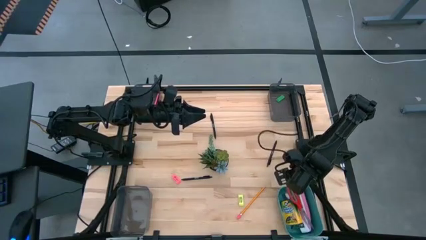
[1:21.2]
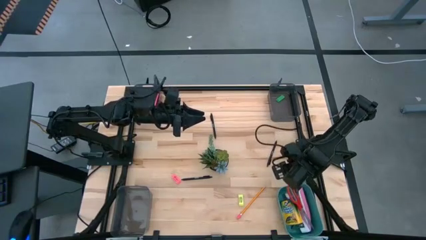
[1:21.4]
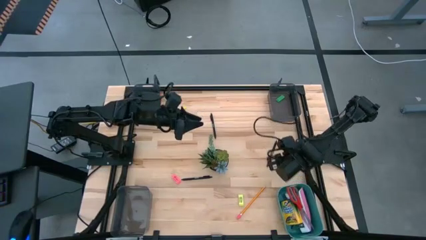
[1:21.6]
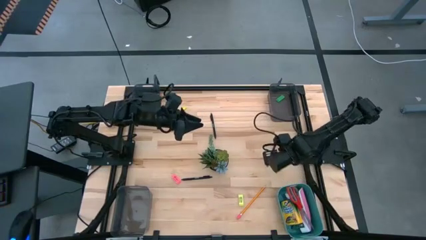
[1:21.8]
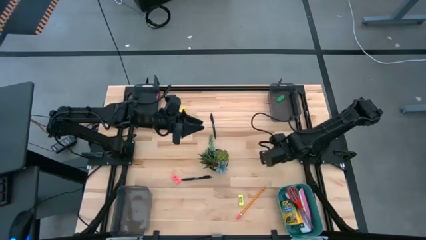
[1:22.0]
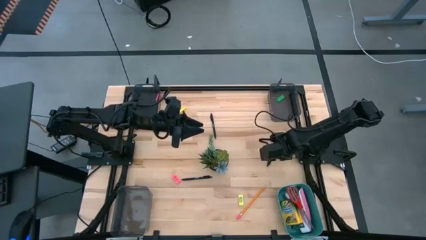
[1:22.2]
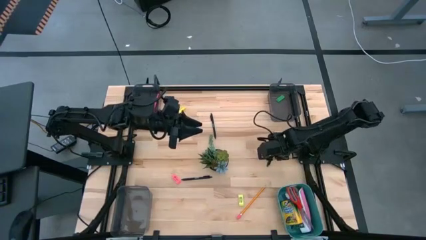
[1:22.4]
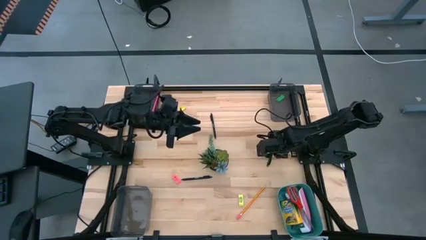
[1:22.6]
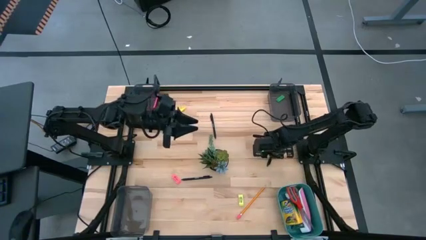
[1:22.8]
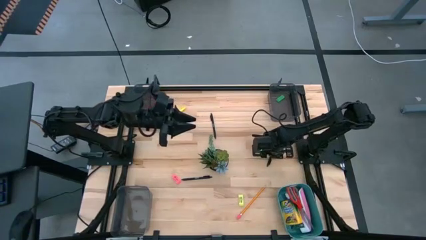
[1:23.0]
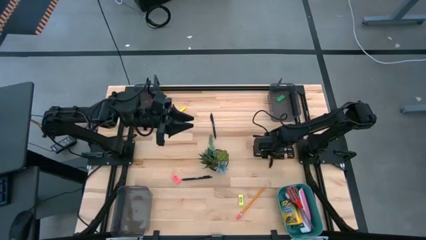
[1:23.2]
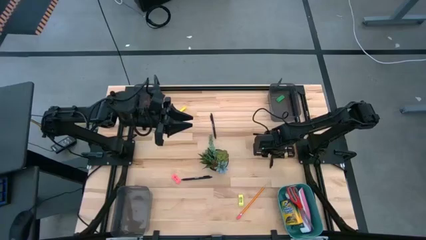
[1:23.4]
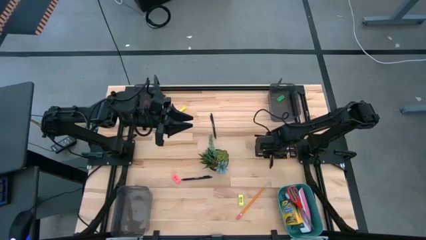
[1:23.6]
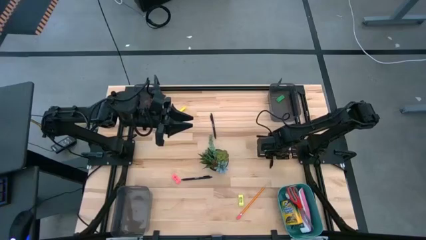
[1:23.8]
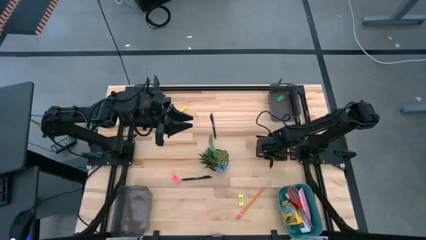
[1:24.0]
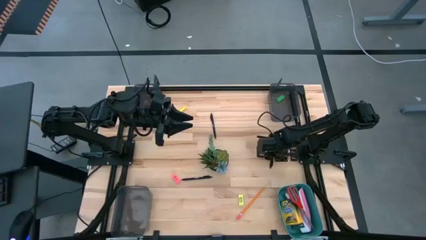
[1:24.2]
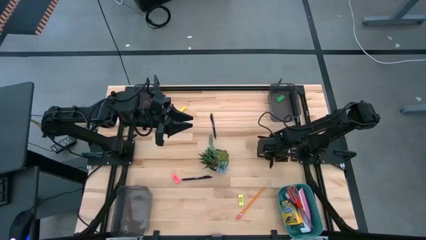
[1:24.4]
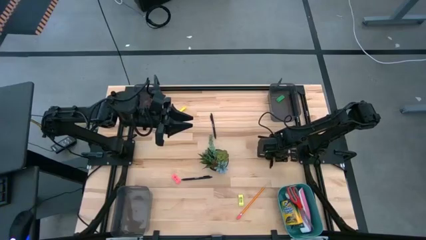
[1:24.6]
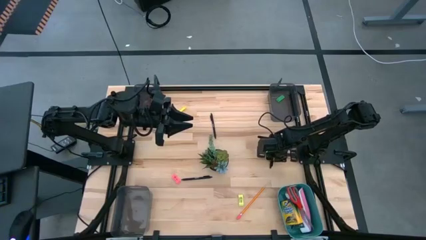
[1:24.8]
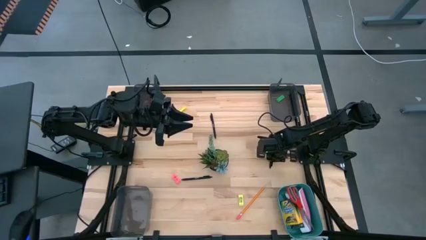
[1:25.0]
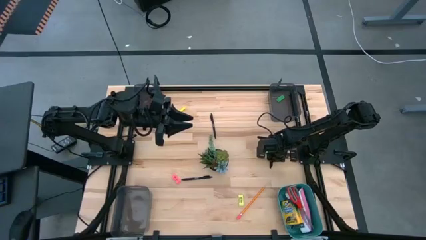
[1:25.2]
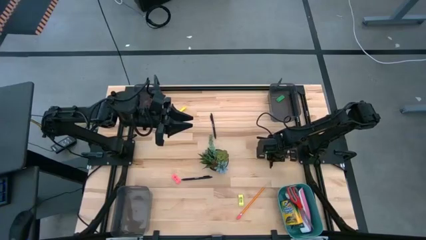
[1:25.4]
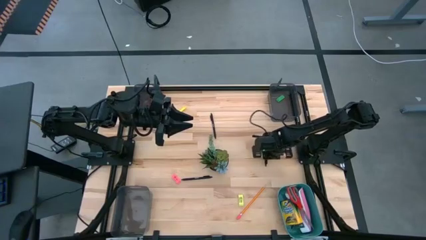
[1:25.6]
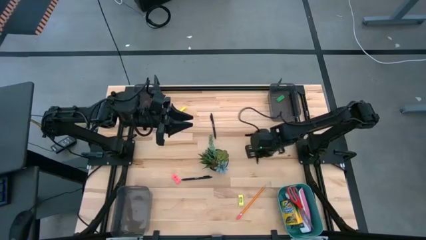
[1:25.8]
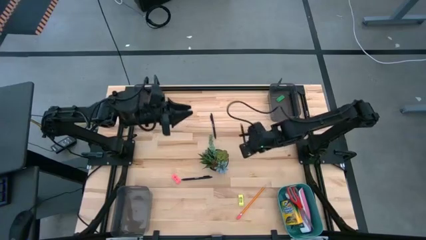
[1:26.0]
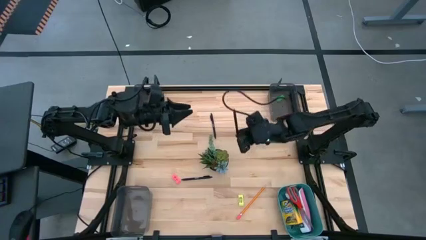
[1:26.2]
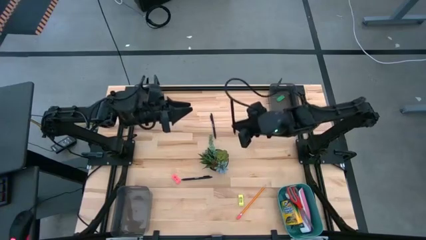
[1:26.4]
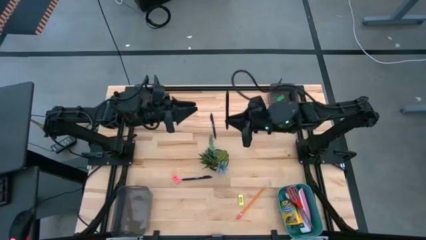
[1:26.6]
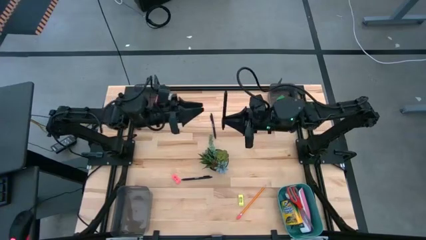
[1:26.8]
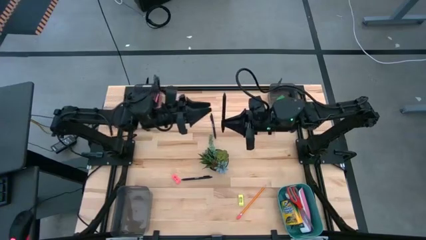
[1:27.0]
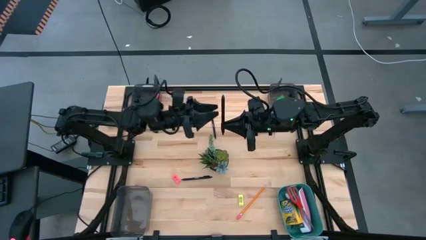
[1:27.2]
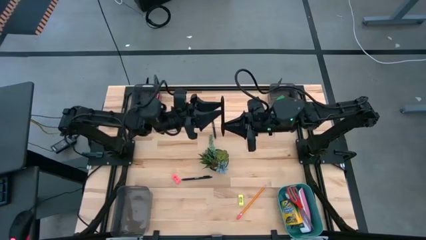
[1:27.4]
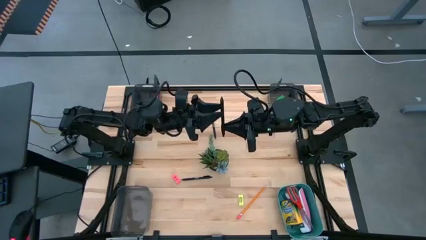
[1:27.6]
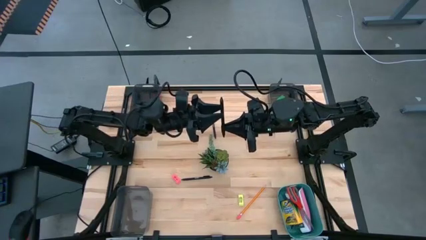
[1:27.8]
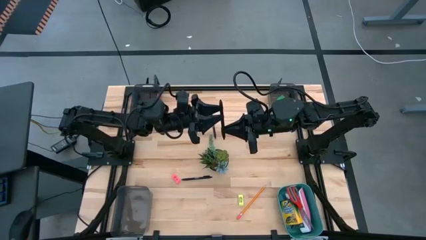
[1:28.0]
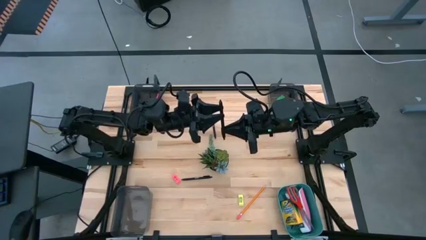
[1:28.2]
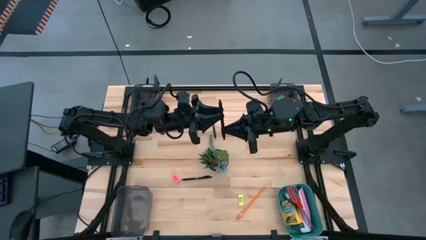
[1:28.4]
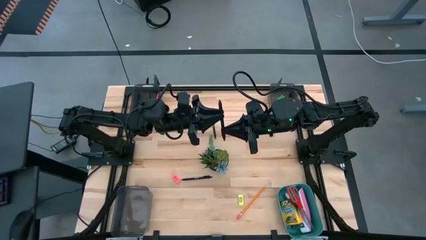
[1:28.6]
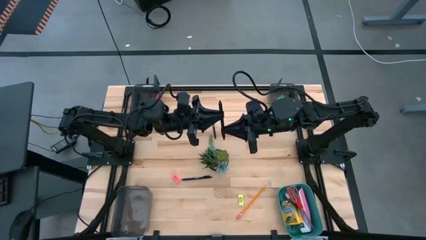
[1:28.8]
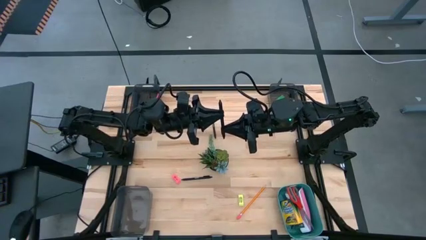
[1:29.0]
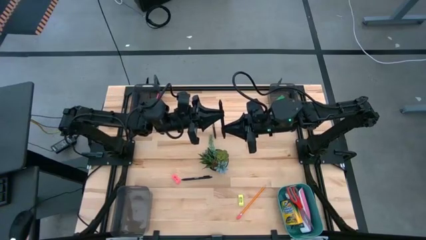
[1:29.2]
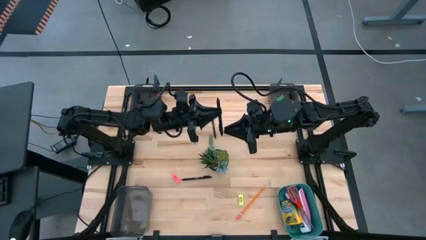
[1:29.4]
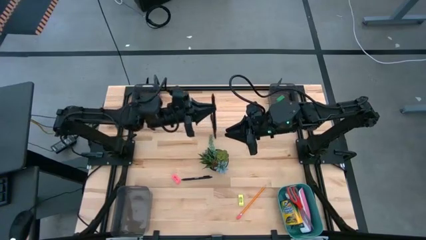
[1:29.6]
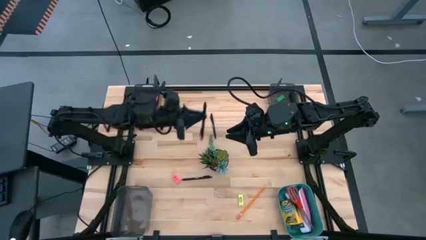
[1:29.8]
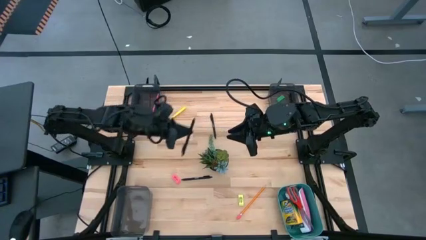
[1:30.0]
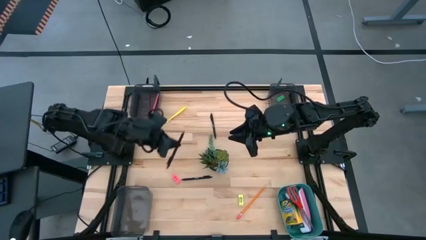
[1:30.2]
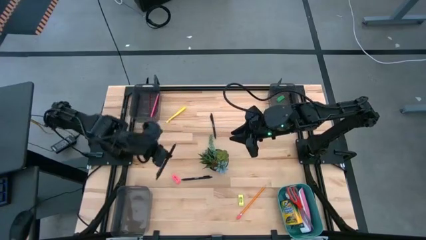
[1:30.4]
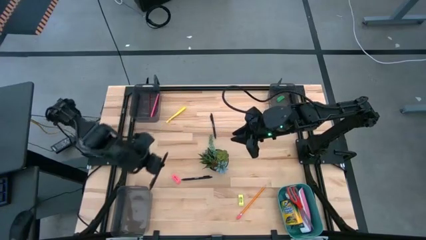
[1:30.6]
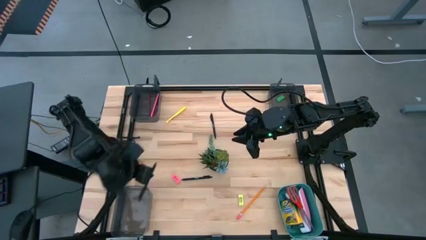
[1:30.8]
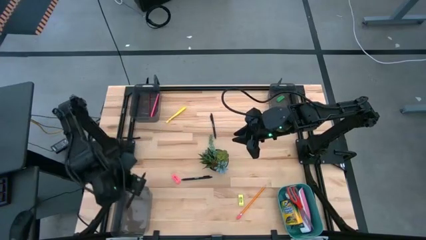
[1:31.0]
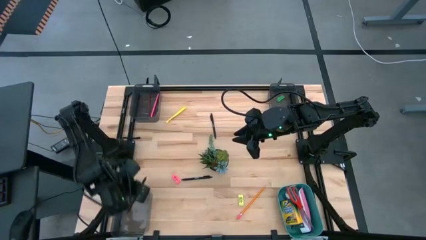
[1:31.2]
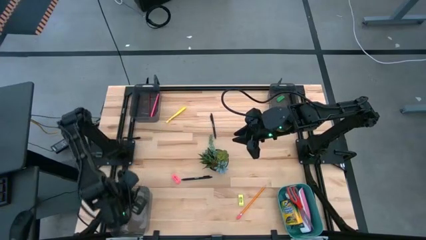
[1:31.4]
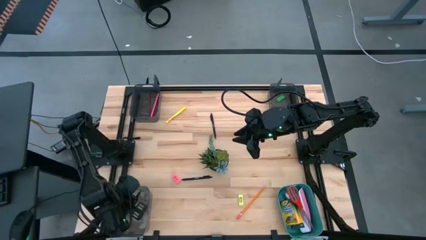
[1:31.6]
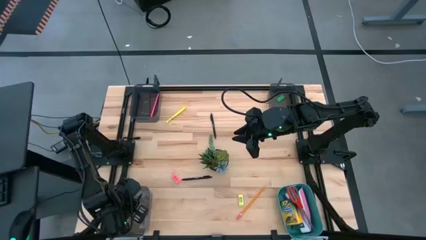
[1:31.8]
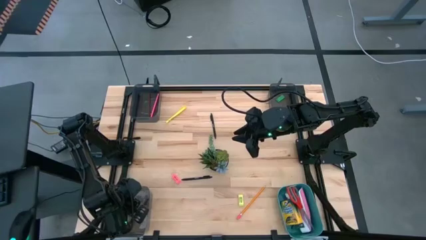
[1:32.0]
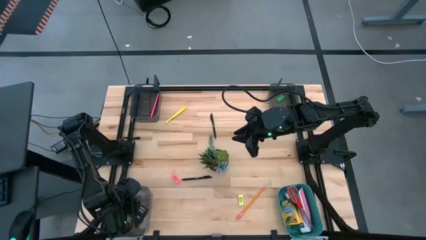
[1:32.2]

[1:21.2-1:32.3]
Task: Sort crayons/erasers/pens/pencils in bins
Put the right black ballpen into the bottom left black bin

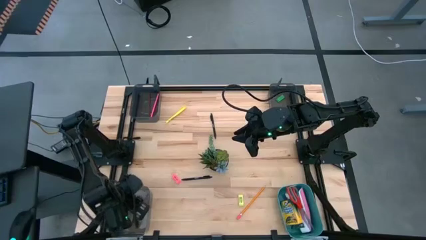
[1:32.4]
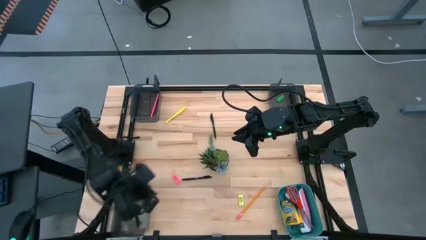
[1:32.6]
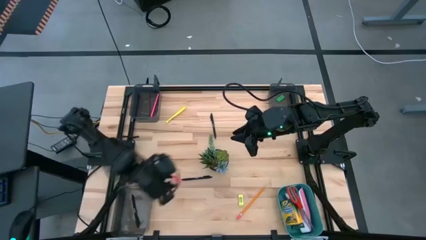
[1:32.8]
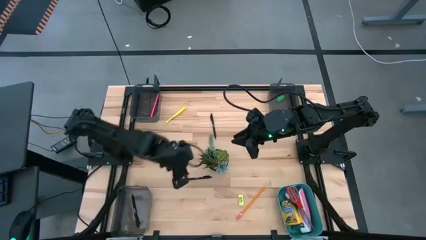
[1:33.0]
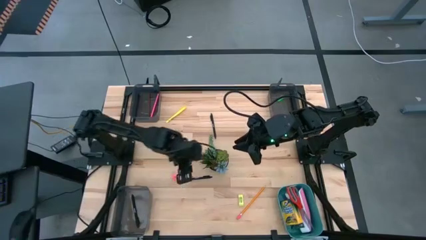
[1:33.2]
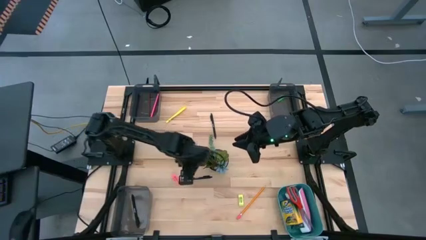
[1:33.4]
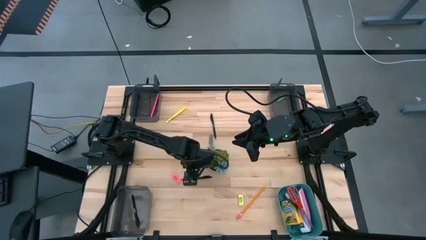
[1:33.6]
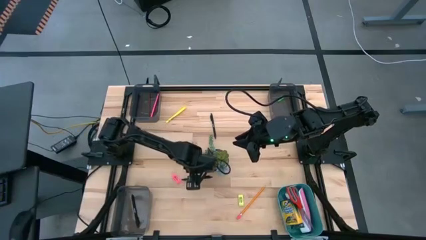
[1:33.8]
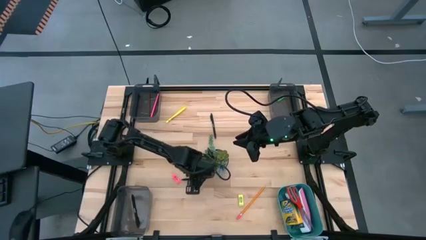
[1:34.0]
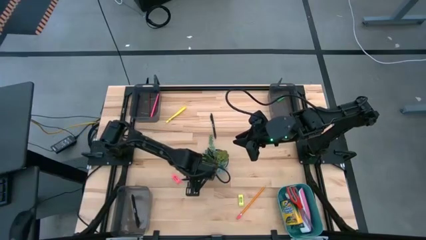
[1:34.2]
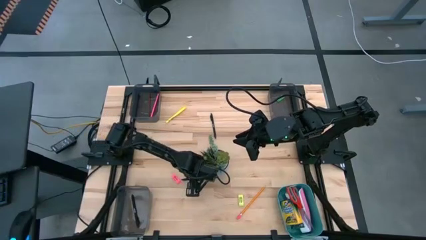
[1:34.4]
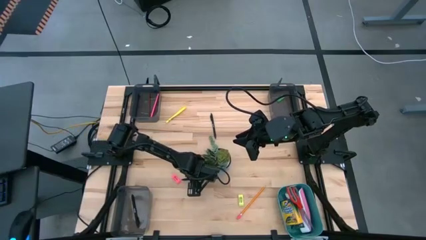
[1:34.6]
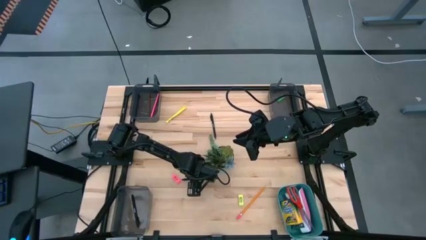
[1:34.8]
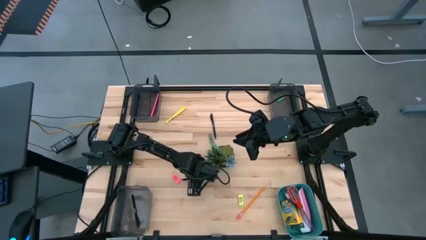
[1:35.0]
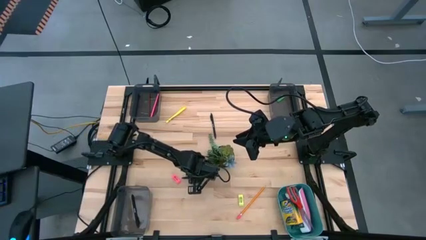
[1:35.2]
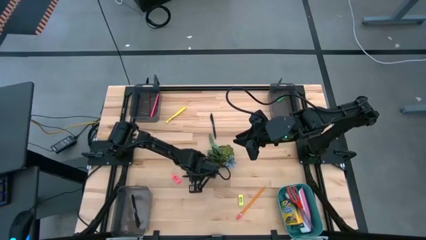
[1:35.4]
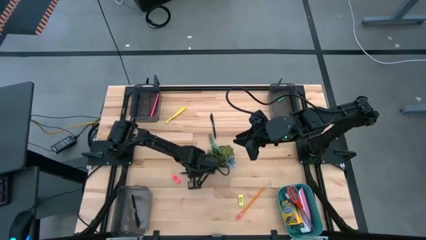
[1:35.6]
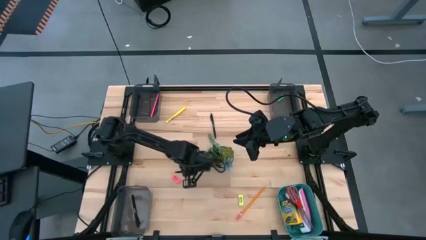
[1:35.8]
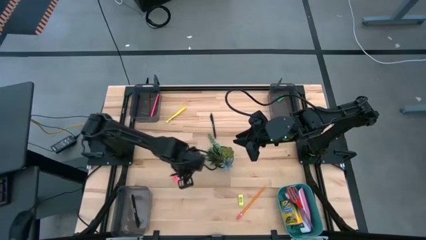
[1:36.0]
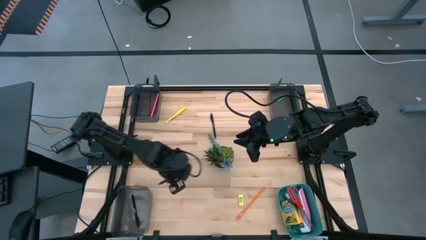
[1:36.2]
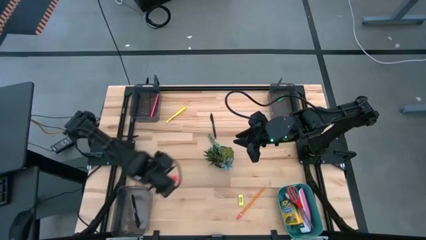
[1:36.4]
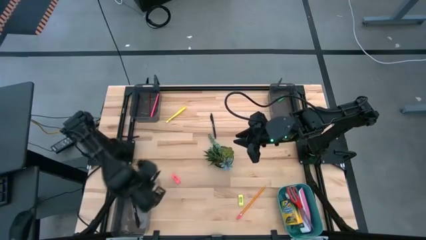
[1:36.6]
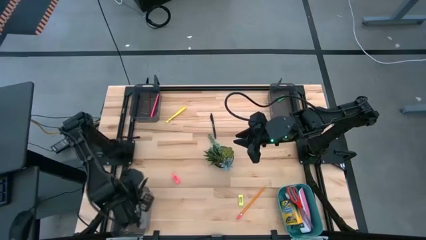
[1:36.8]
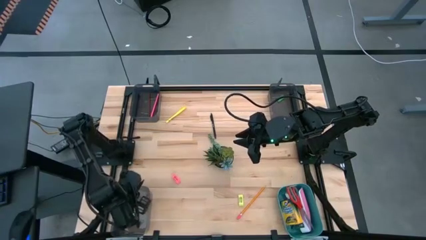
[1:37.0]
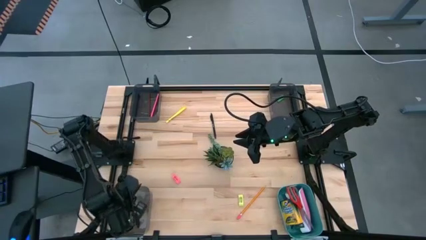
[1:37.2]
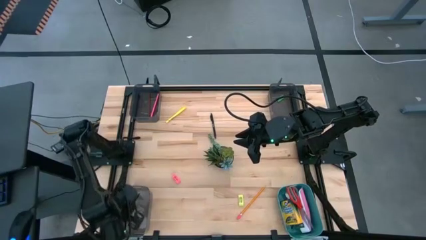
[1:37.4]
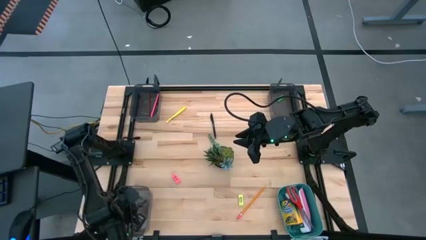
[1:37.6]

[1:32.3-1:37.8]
Put the bottom black ballpen into the bottom left black bin
